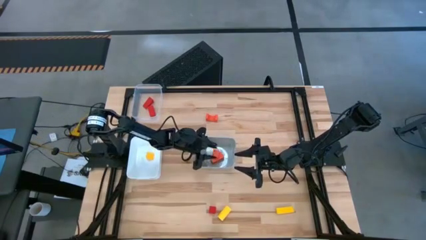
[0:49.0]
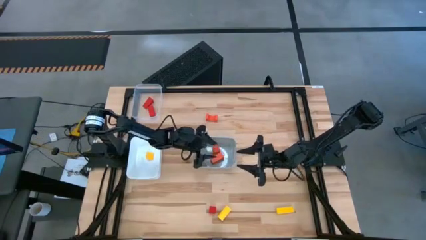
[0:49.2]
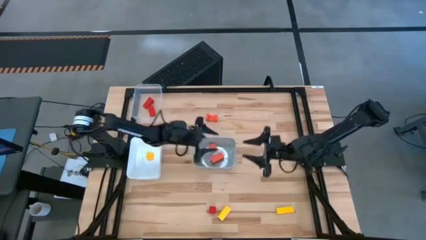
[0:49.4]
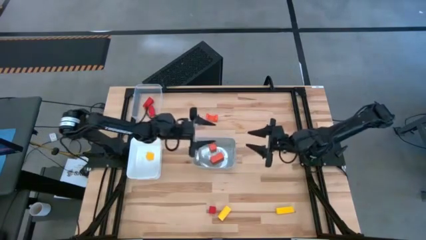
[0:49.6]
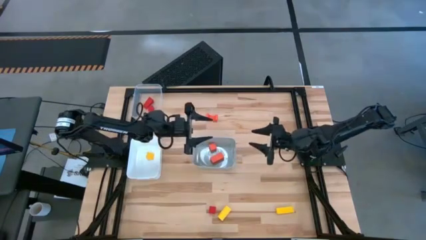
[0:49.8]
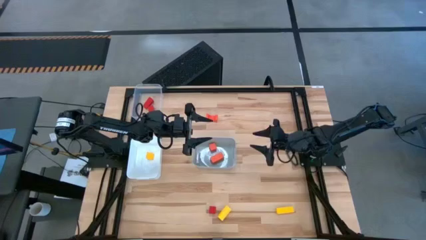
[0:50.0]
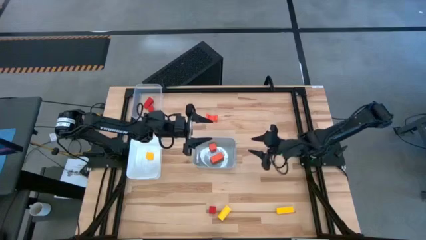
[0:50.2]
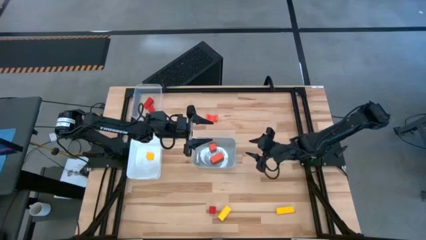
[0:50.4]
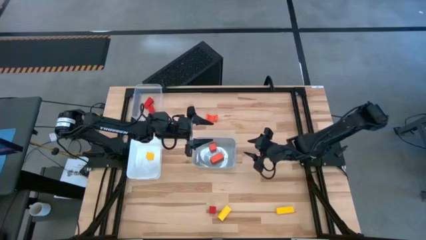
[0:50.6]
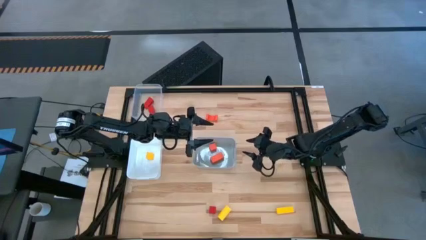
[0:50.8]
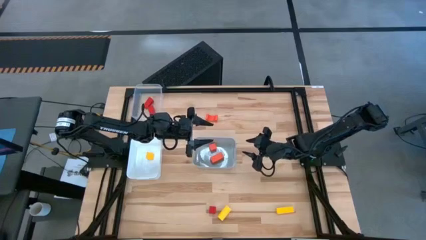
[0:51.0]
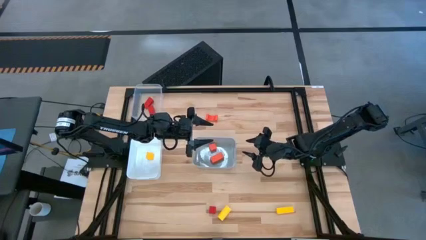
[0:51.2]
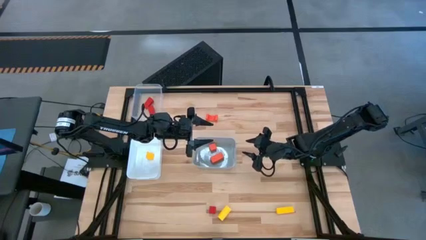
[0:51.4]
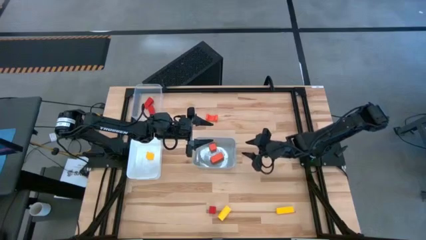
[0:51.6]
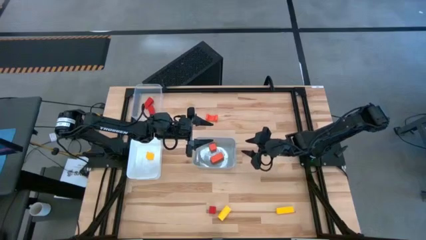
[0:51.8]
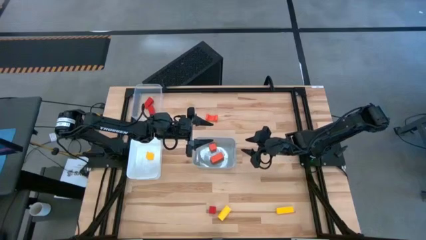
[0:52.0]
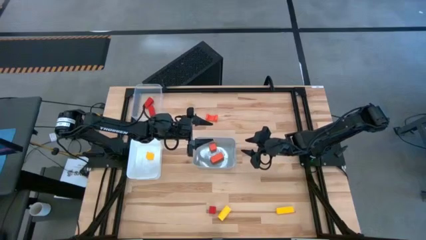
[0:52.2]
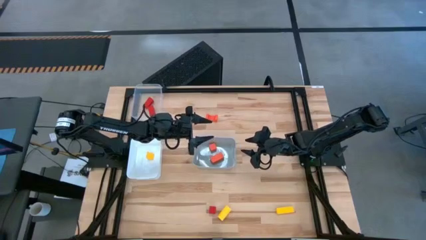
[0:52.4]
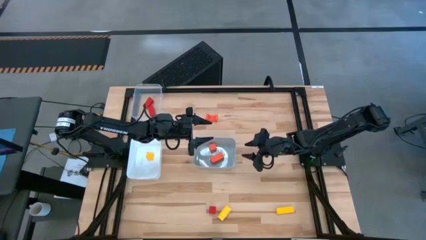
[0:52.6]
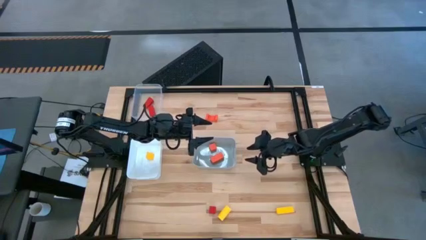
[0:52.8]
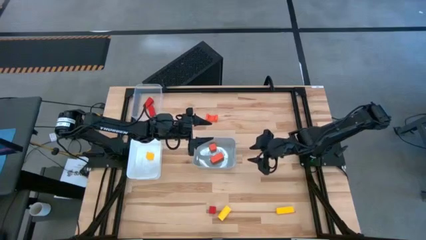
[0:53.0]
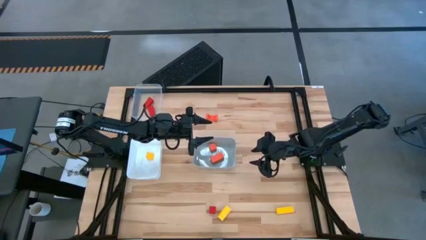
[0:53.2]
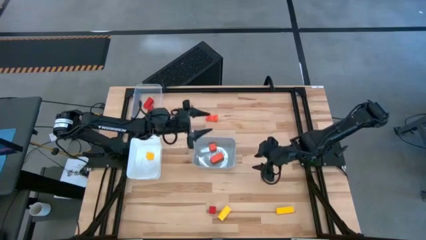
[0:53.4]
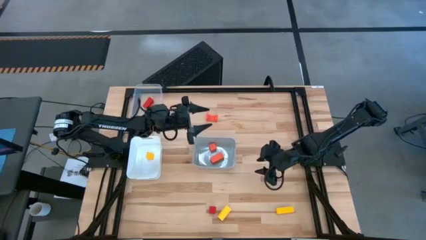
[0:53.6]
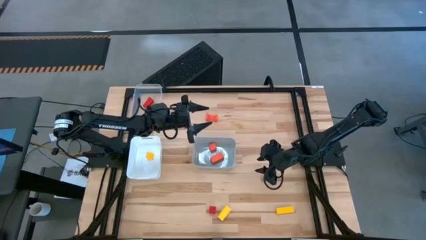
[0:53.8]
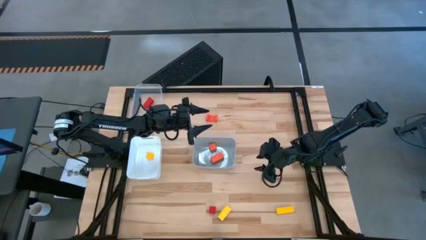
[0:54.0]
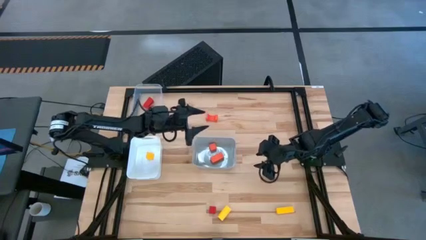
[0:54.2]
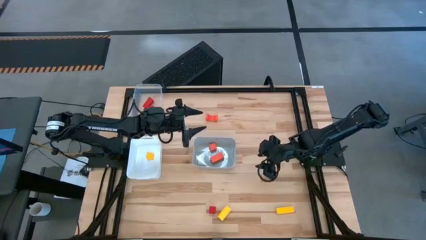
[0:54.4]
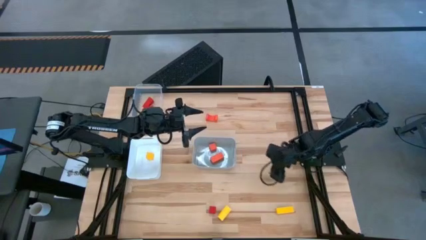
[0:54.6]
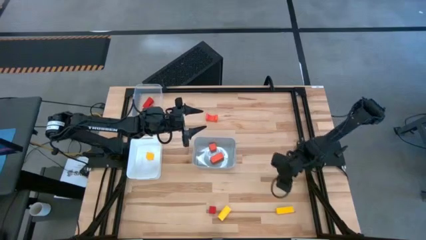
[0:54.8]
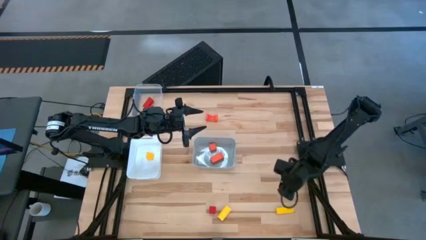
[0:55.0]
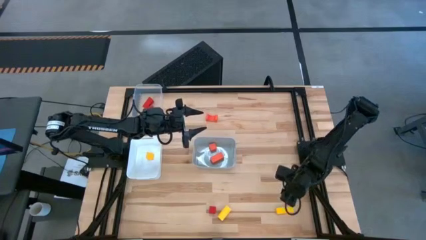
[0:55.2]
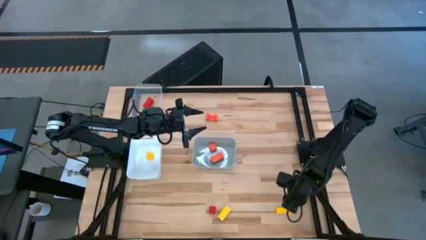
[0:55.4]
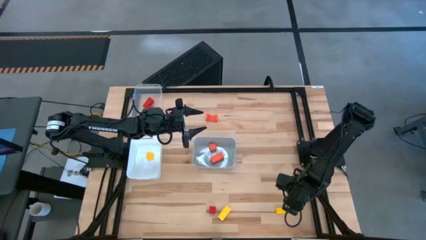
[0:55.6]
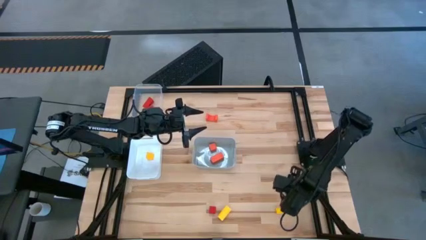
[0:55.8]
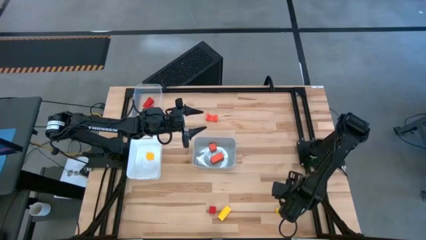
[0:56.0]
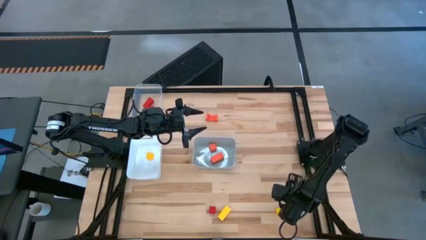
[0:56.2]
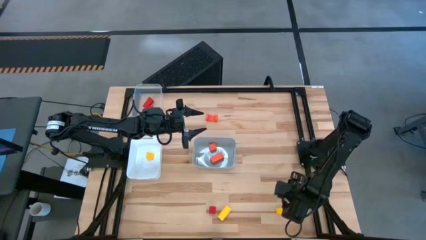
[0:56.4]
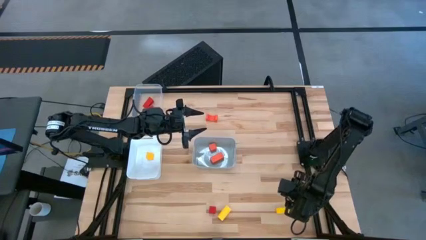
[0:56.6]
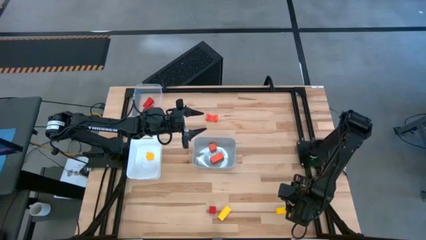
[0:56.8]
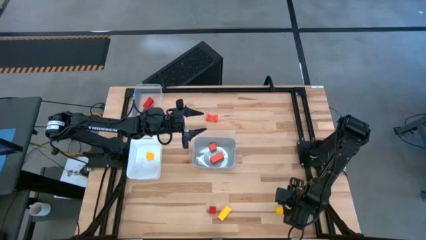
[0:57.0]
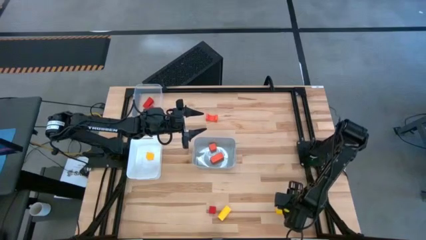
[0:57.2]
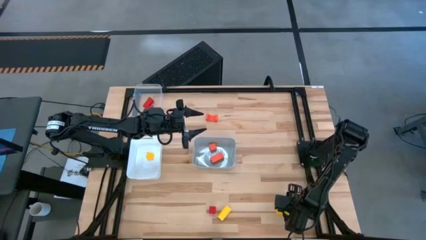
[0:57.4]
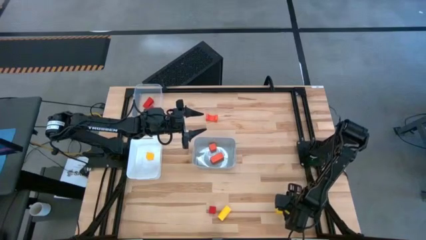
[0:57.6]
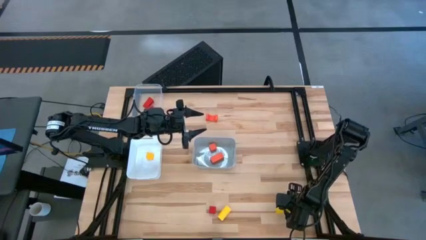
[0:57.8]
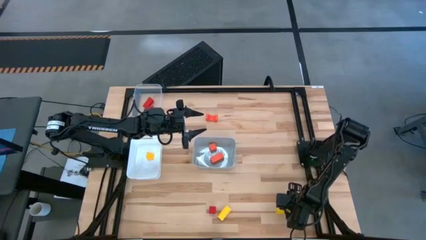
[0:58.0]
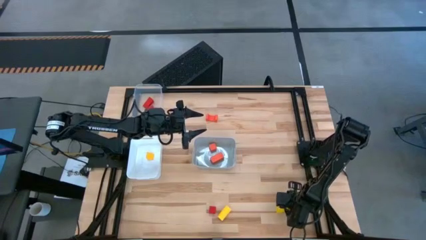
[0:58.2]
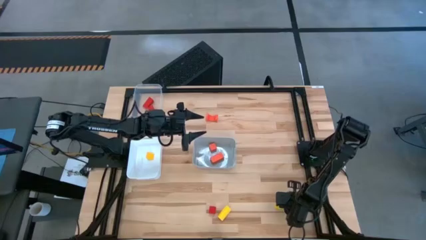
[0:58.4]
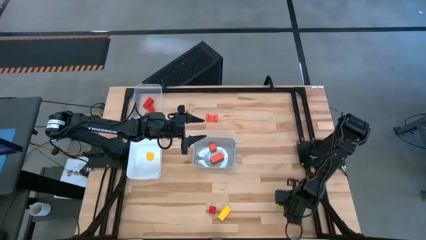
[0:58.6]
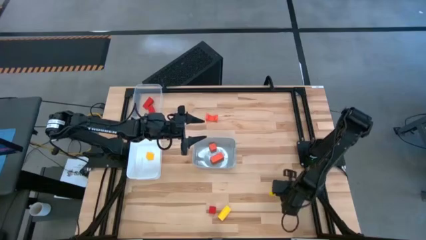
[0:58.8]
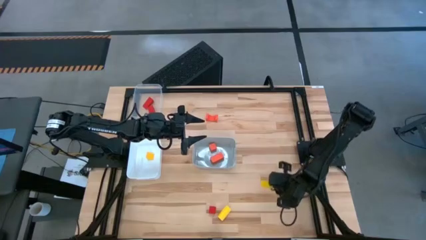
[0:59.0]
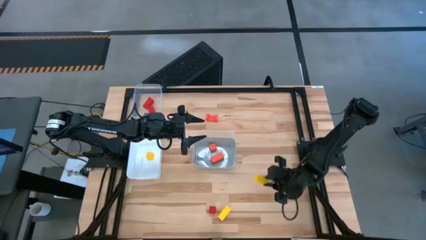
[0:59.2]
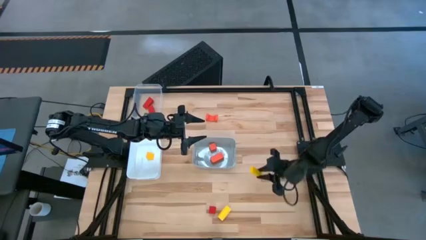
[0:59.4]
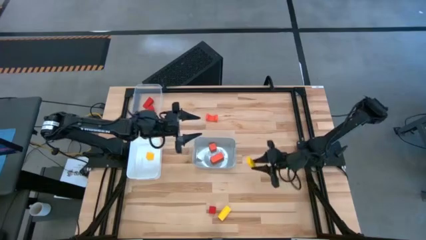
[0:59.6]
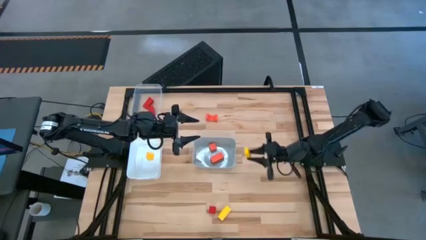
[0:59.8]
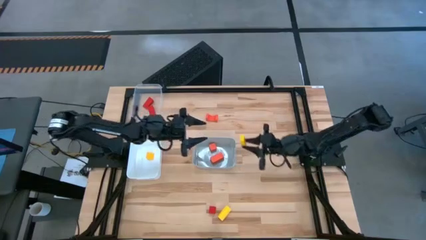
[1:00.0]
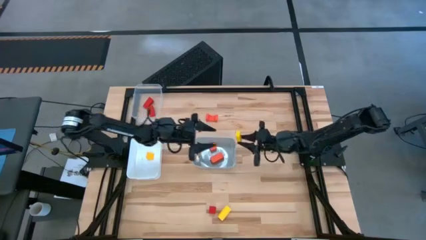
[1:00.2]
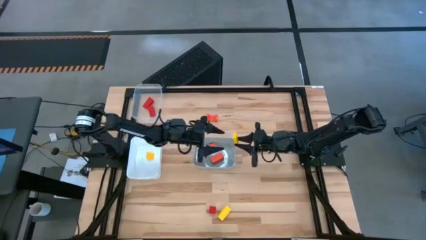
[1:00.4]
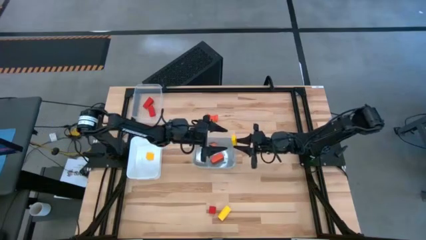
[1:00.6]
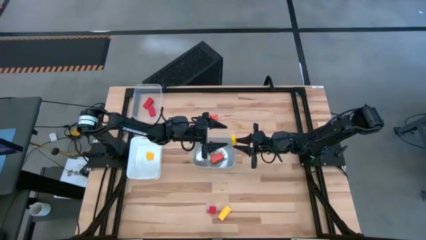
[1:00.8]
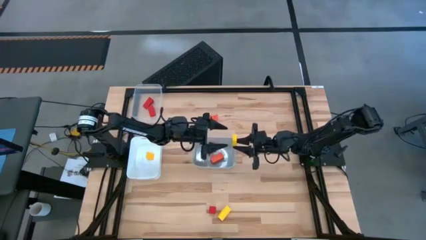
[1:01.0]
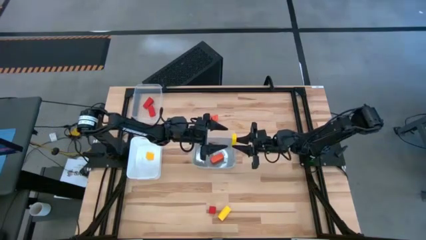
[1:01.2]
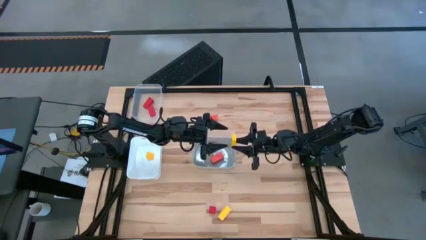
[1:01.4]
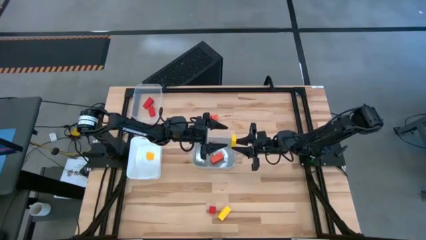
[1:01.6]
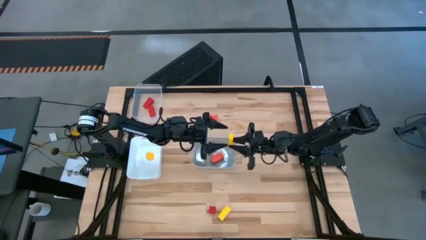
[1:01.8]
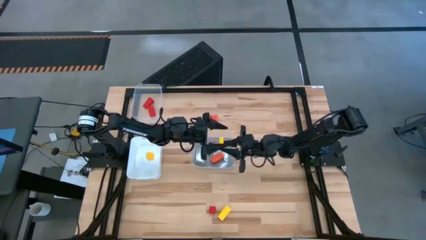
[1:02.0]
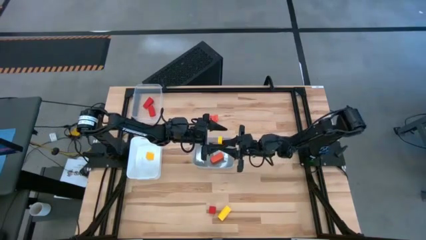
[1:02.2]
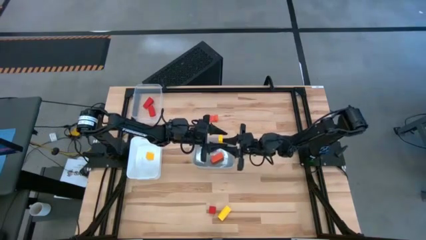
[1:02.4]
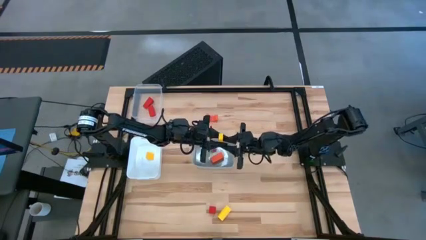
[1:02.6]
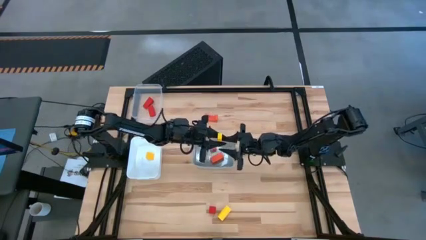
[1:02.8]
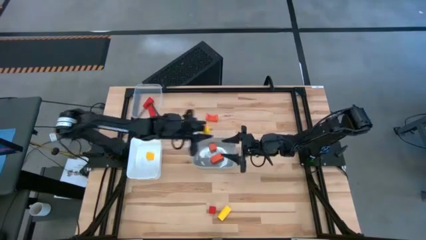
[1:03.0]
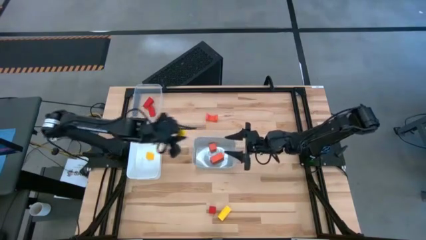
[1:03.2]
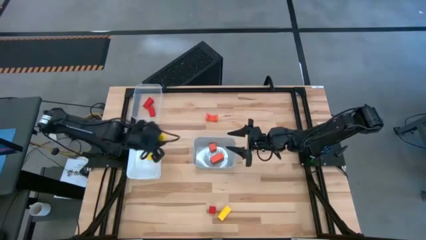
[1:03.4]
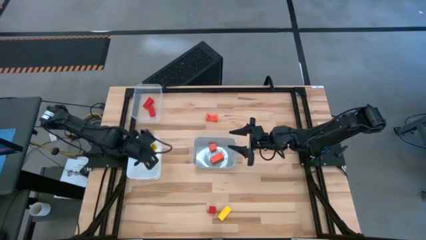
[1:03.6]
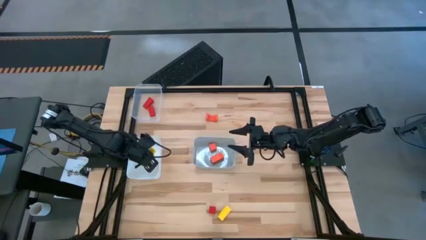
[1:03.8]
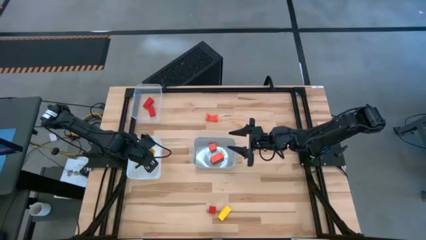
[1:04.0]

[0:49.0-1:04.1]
Task: Sort & place blocks by color
Put the right yellow wooden block into the white bin
